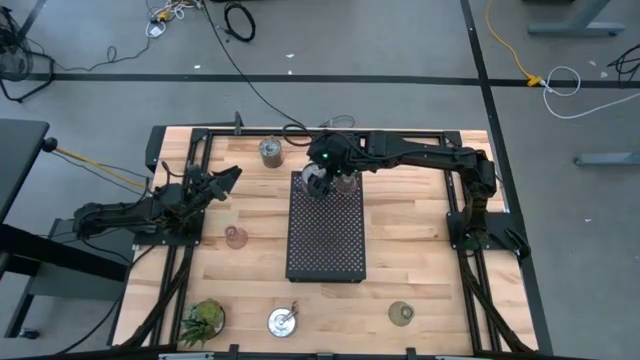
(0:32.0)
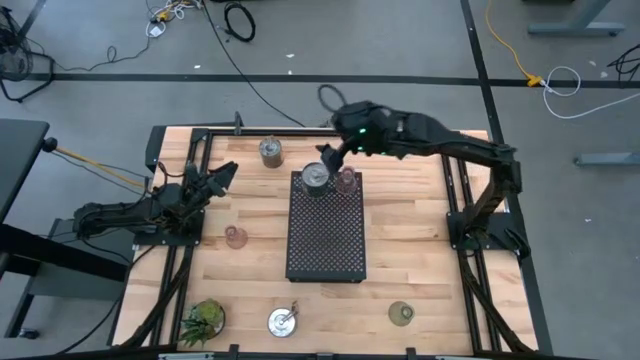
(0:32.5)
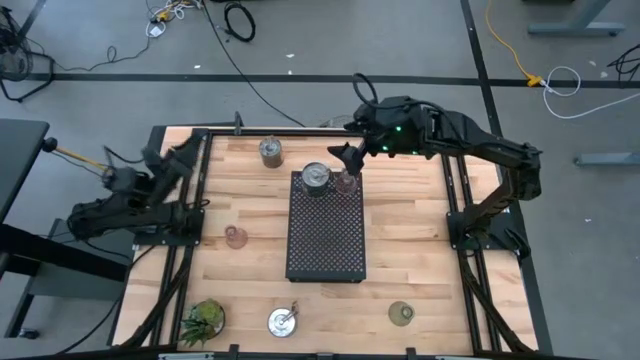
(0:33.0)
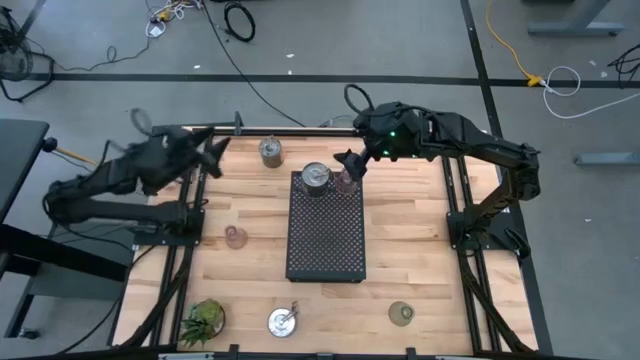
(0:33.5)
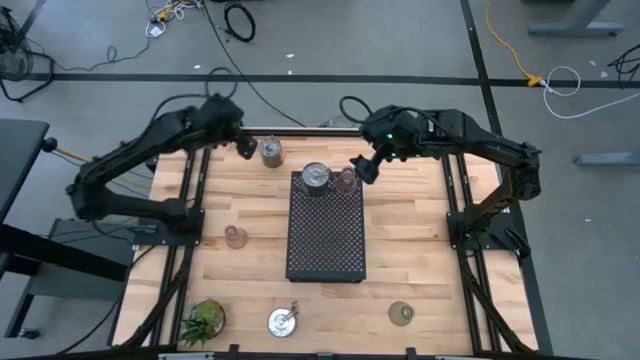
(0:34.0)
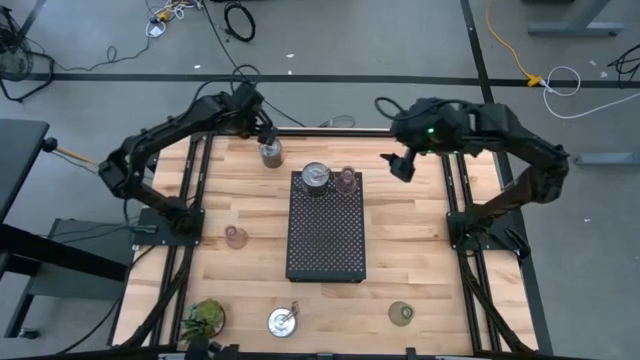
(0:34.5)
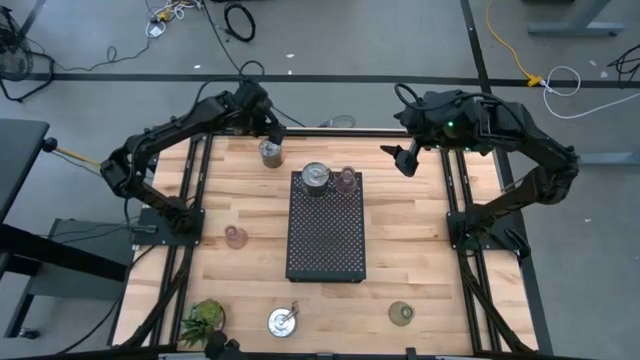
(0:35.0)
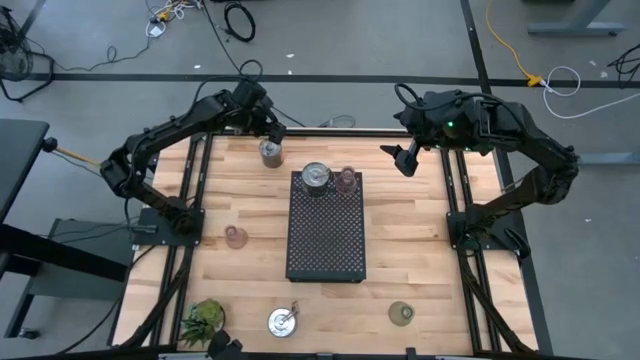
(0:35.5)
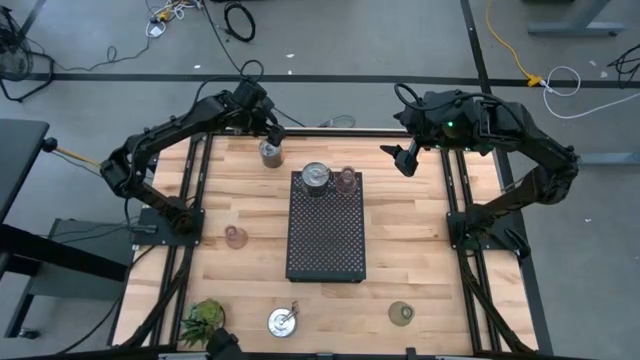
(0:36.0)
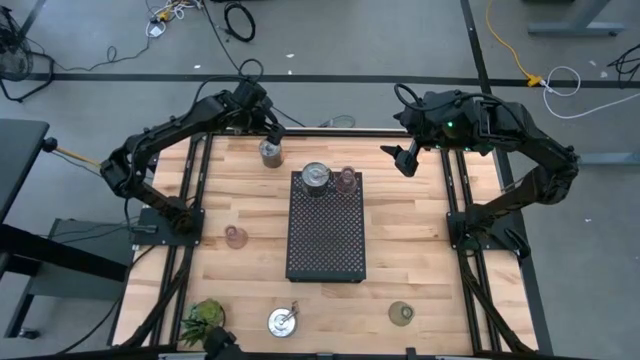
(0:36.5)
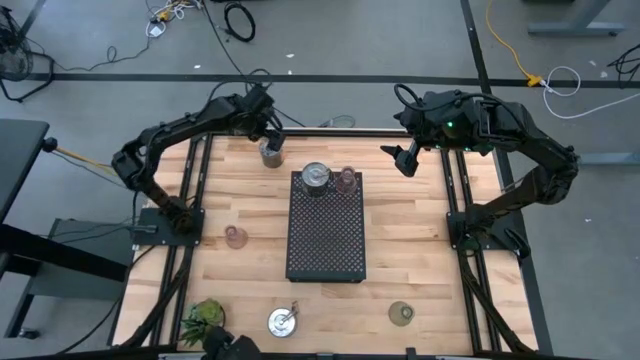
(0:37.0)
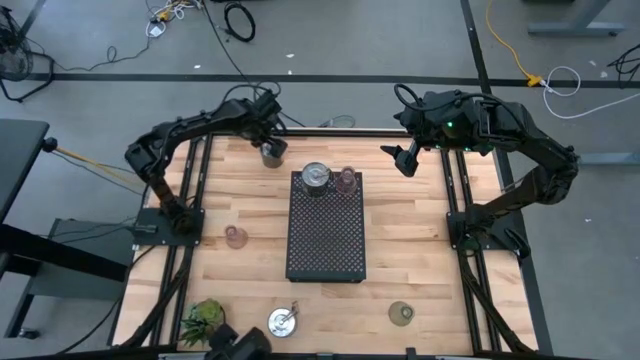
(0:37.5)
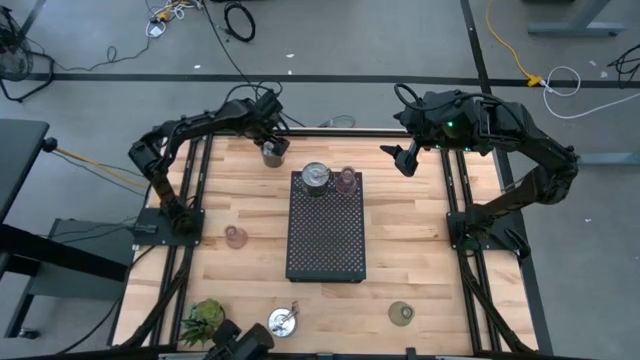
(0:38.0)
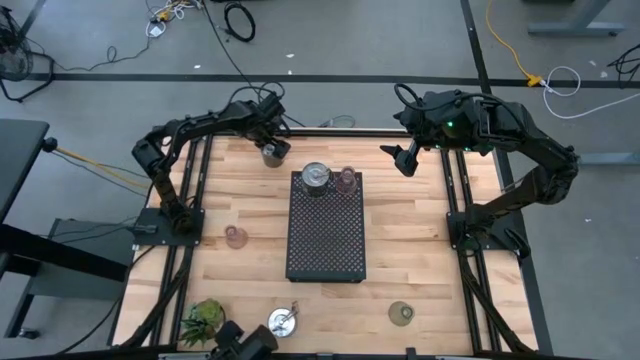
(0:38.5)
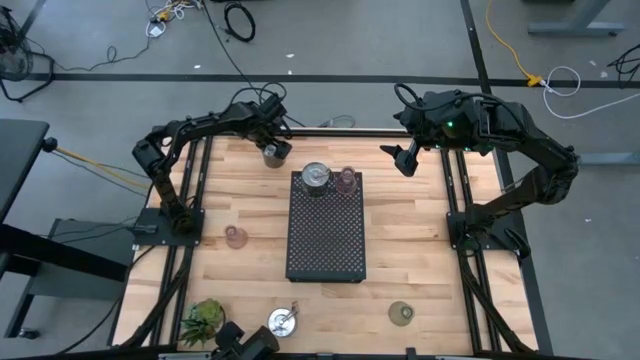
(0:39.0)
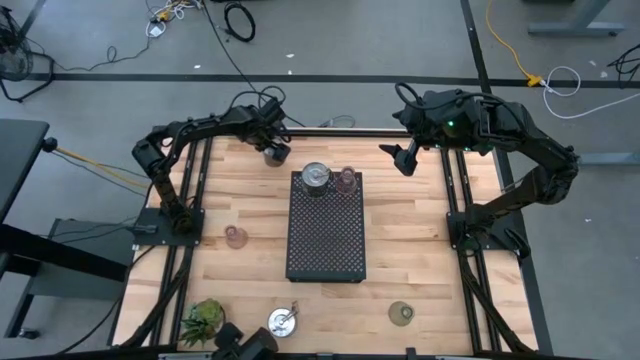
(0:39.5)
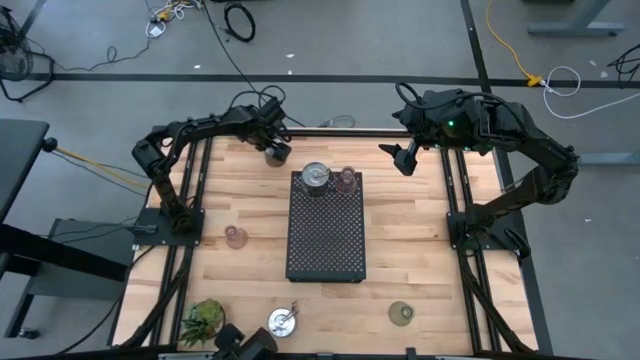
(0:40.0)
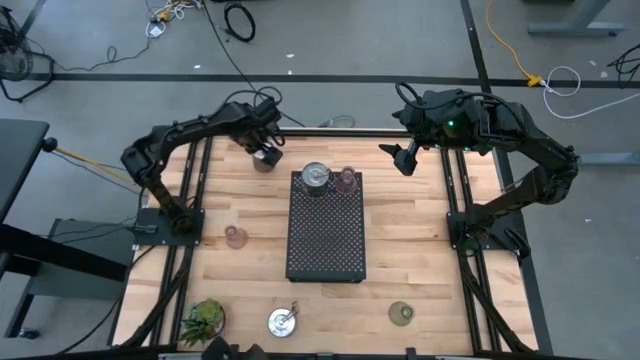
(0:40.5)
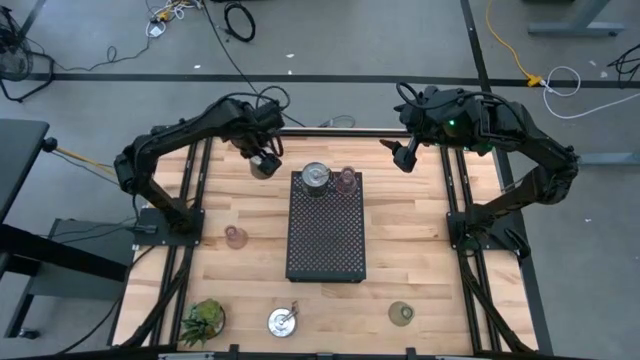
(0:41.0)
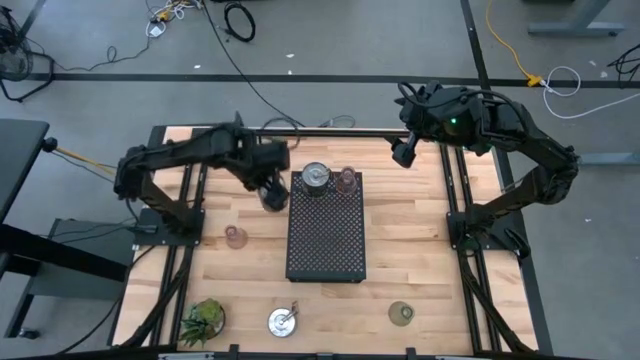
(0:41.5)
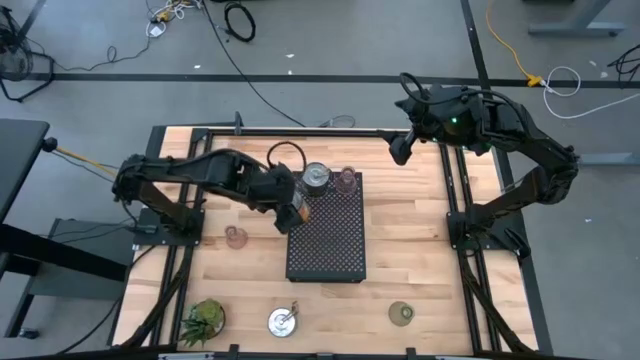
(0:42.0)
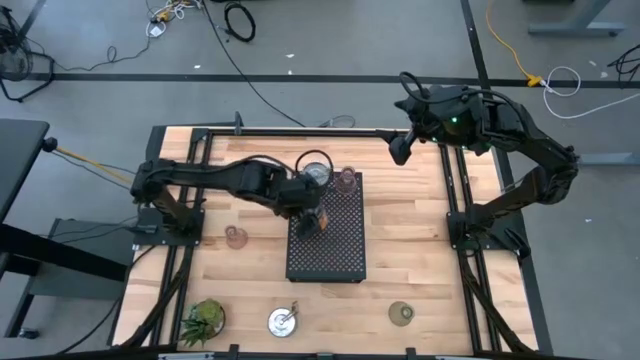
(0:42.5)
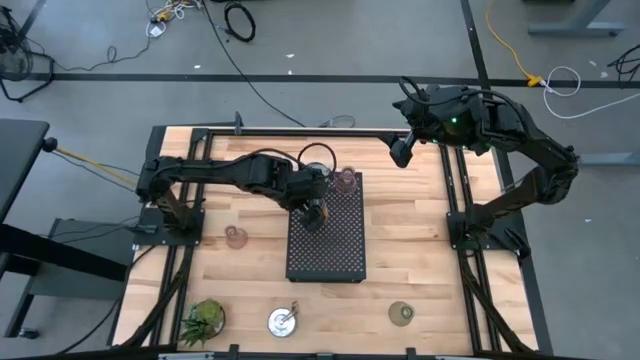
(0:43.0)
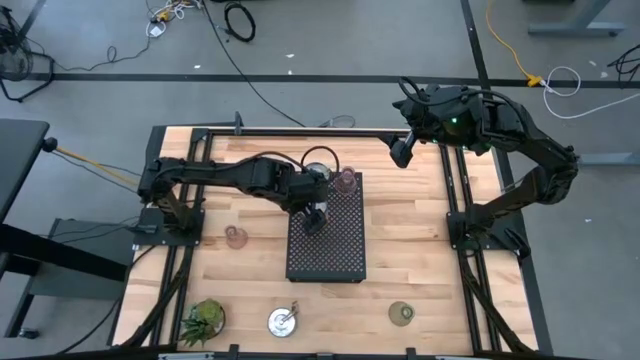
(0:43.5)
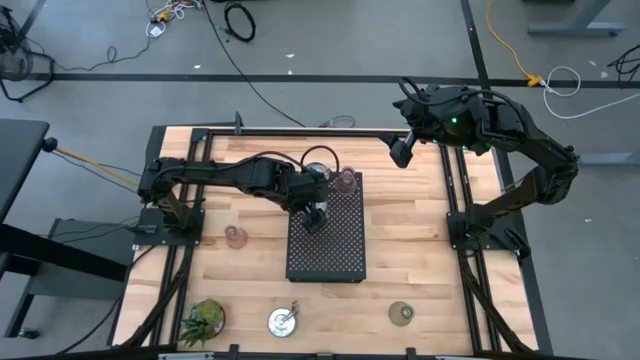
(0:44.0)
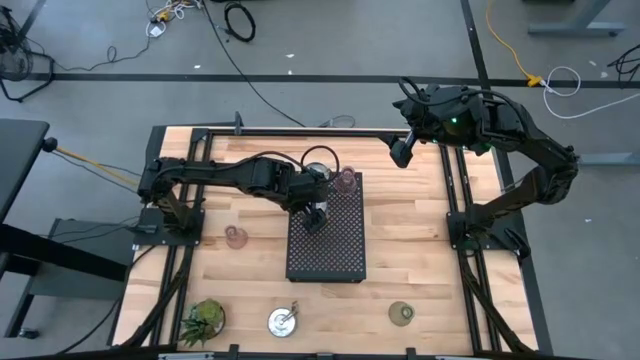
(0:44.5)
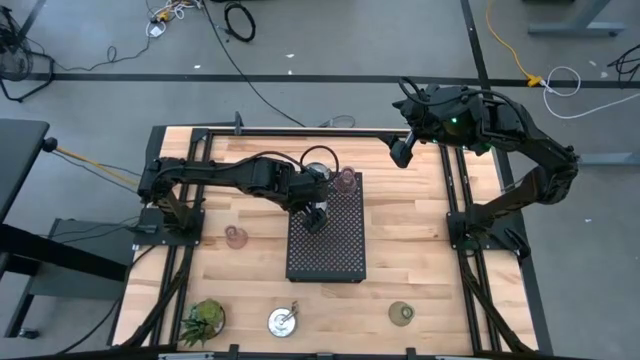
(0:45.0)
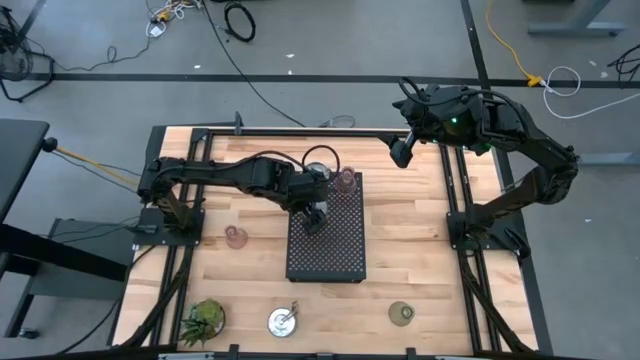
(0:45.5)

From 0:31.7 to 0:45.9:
Task: Pick & Place candle stick holders
Put the top silver scented candle on the shelf aligned with the other scented candle

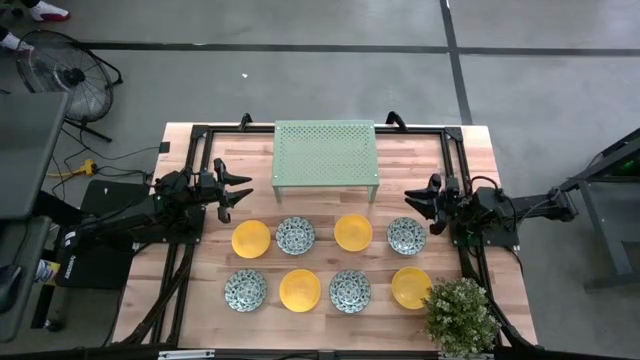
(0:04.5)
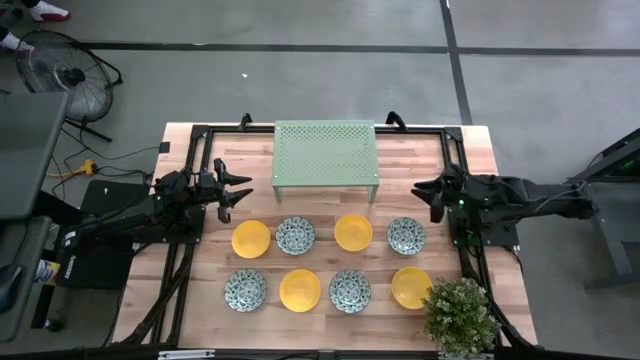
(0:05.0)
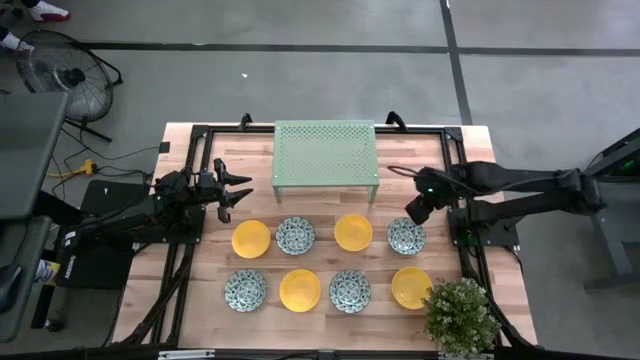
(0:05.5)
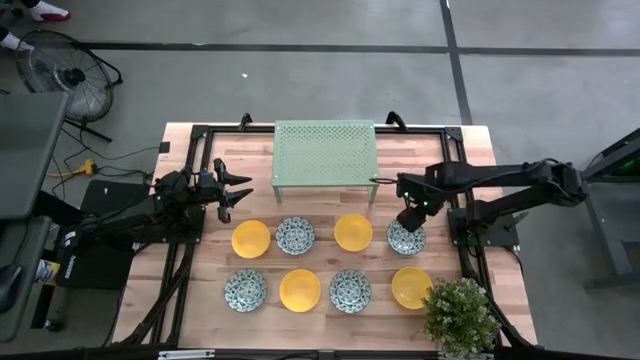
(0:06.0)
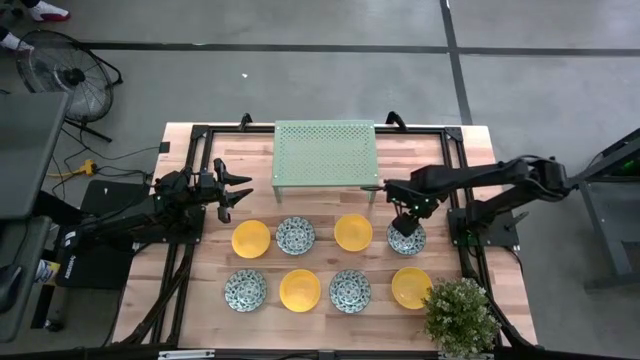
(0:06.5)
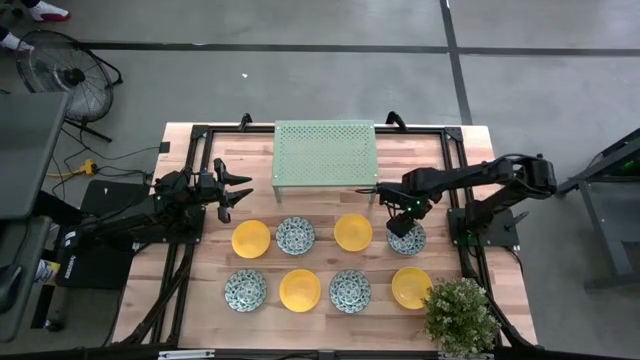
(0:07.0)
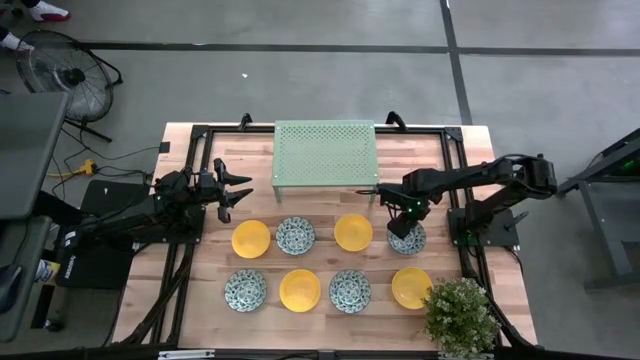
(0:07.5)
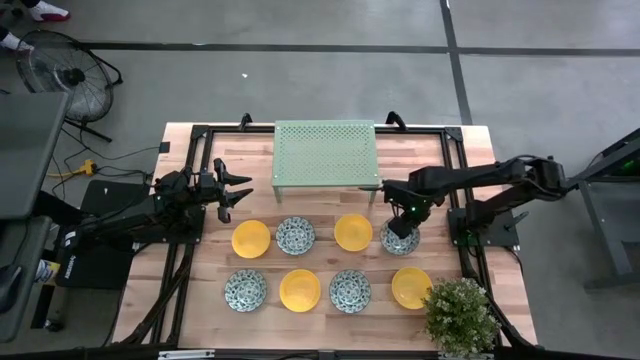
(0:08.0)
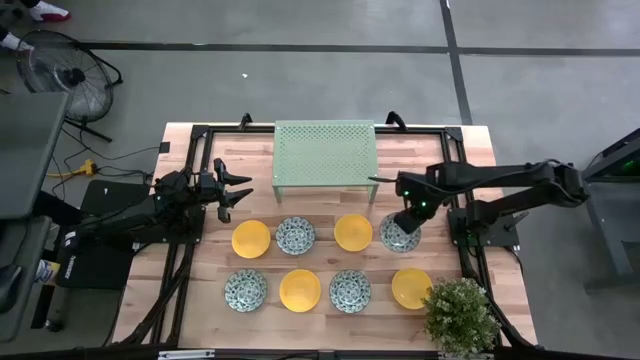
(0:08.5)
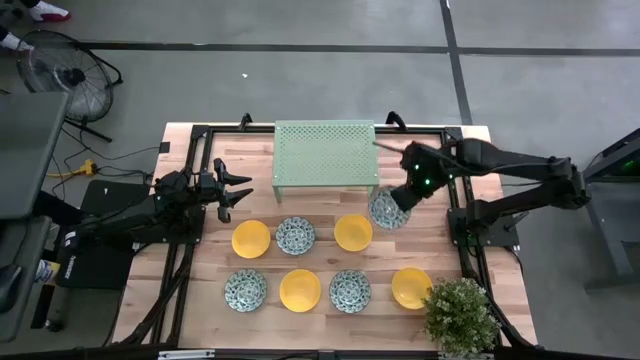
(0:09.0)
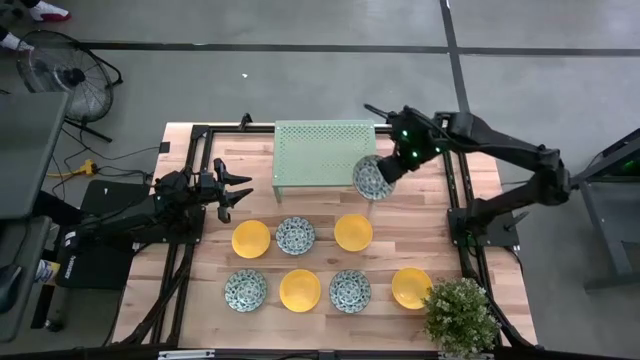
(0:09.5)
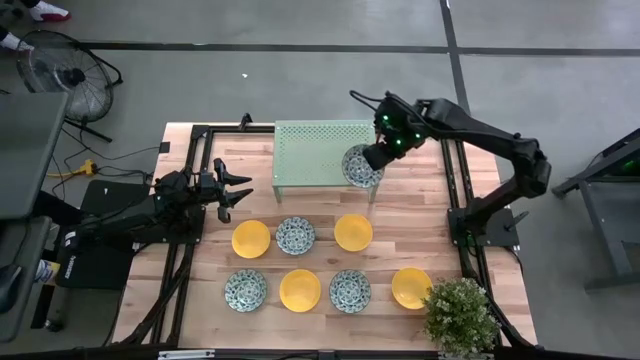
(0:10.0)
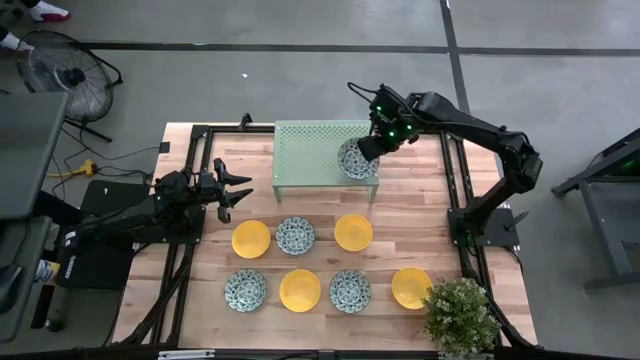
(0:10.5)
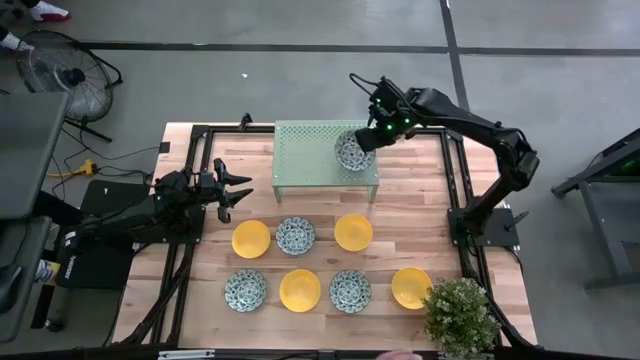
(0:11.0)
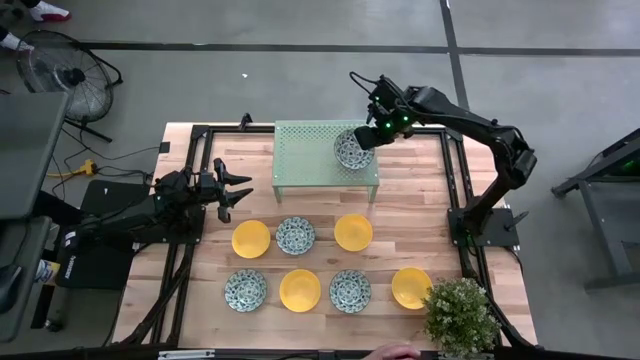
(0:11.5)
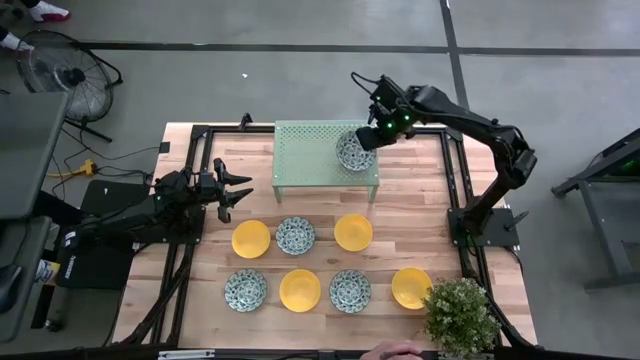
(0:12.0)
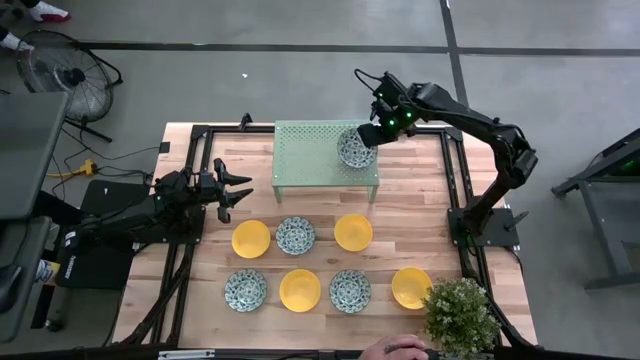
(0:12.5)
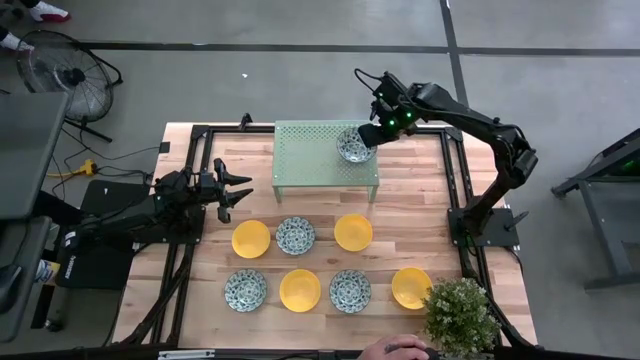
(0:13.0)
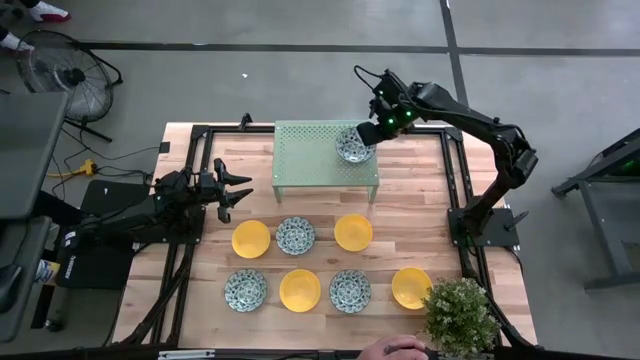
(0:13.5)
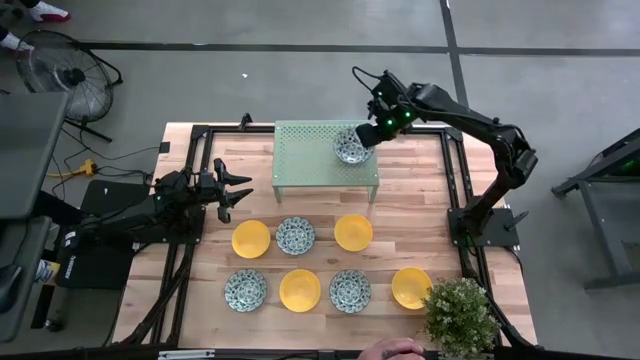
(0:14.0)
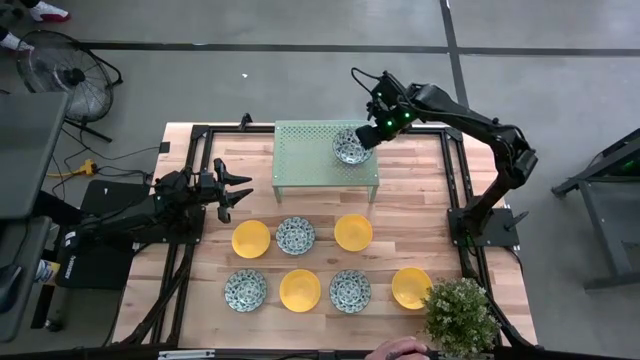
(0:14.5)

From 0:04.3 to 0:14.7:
Task: Pick & Place Mini bowls
Put the blue patterned bowl on the shelf
